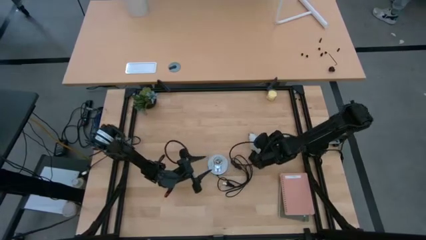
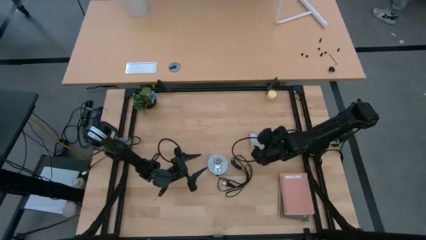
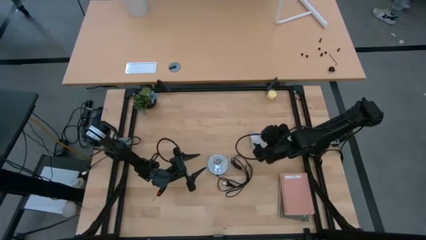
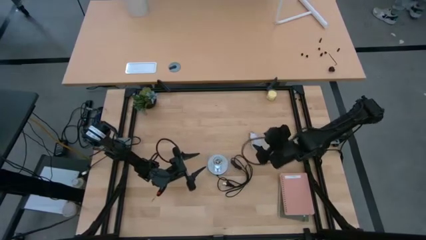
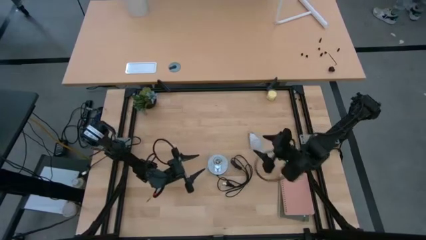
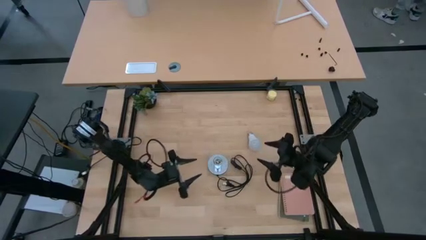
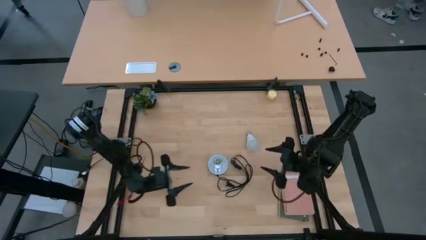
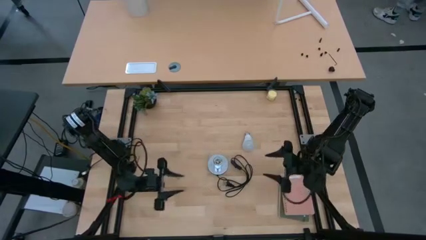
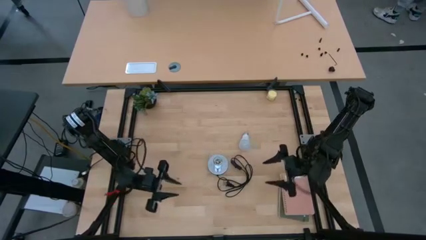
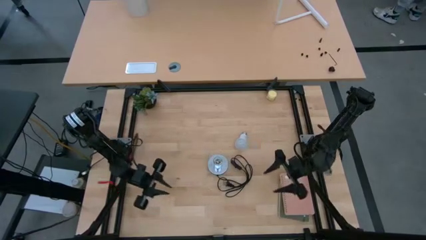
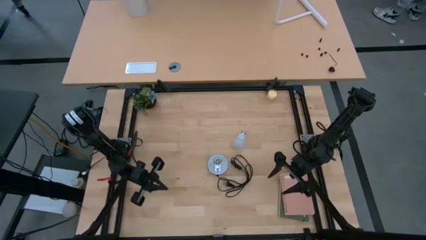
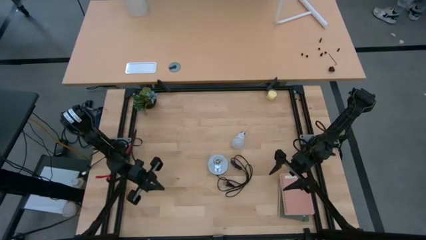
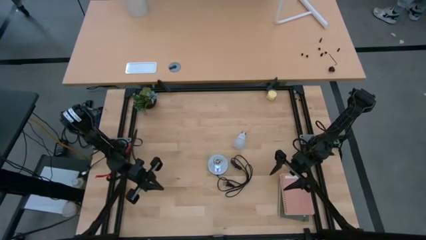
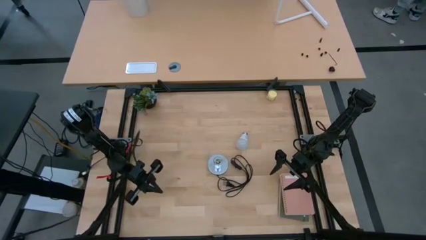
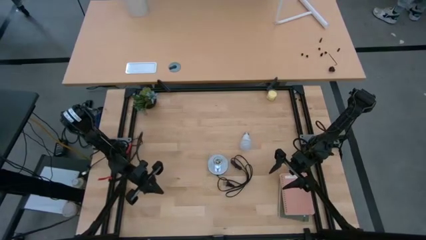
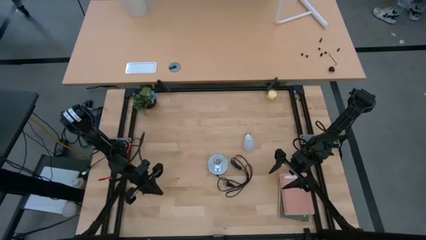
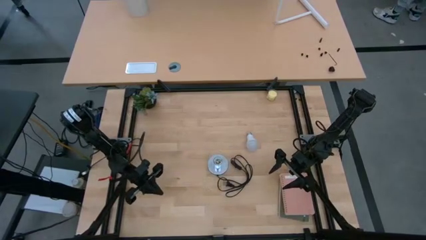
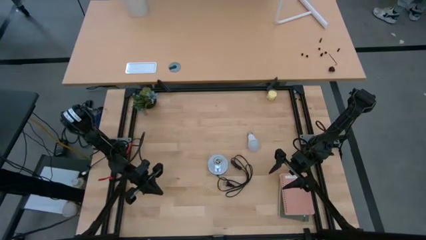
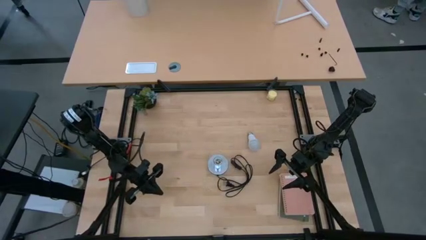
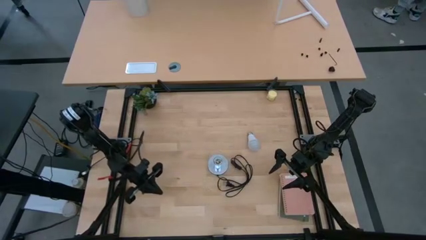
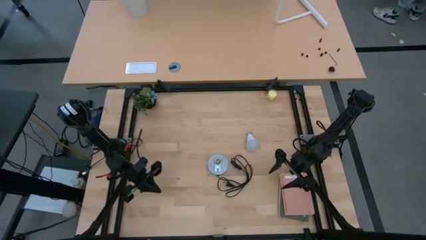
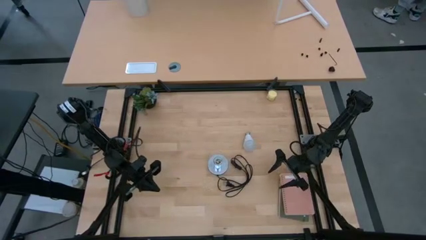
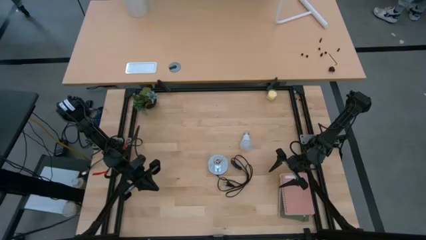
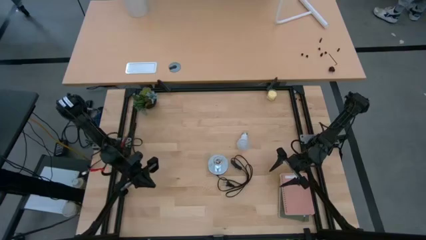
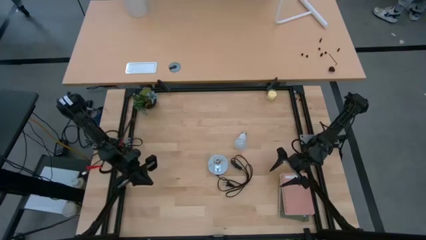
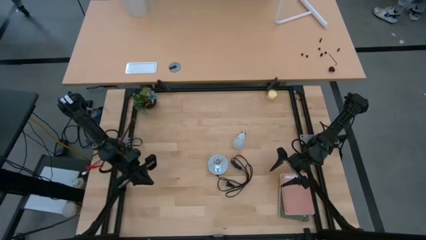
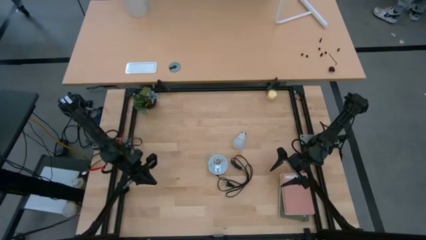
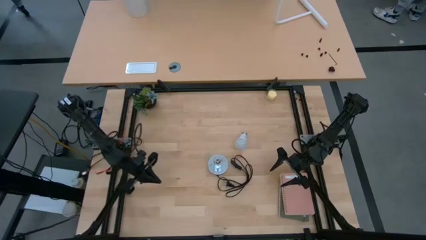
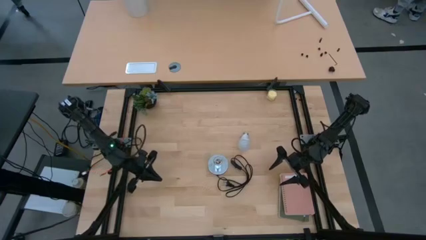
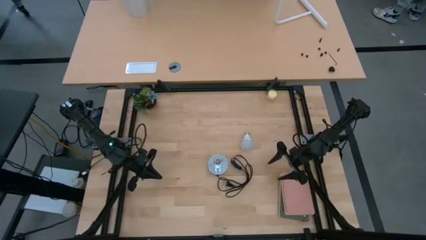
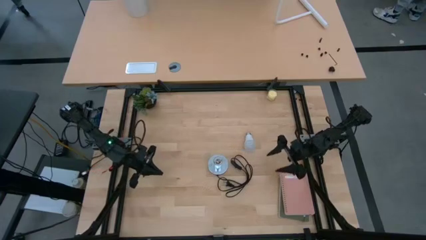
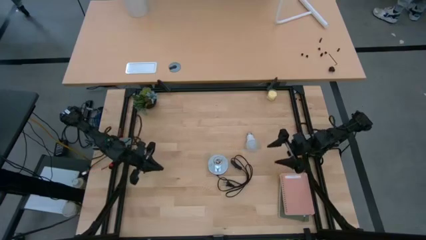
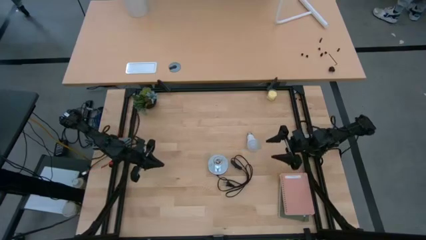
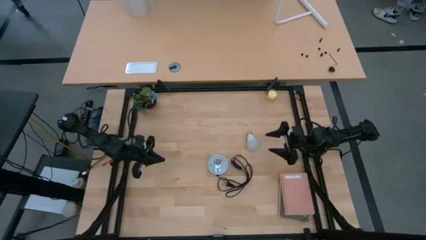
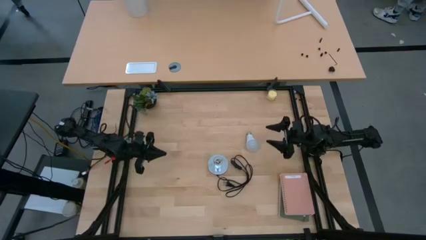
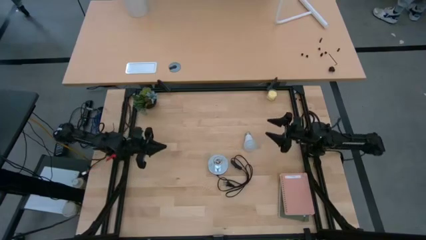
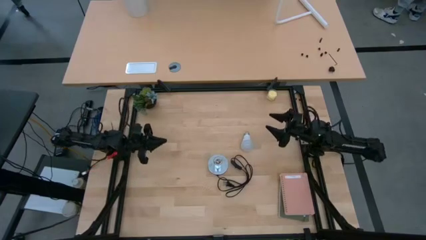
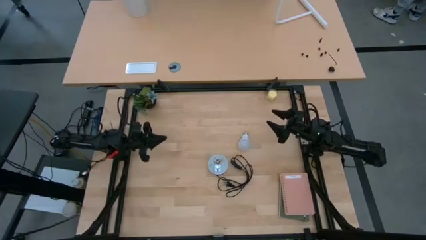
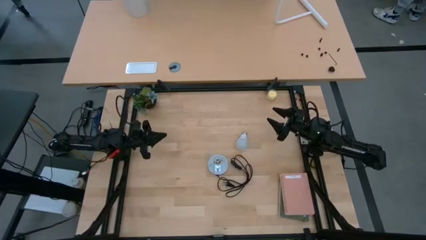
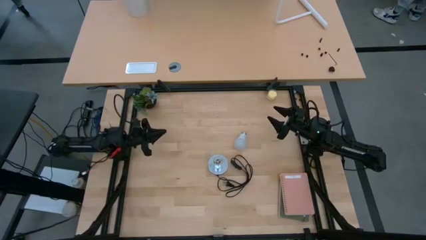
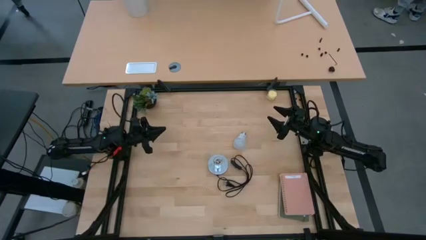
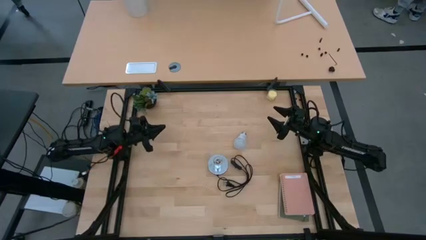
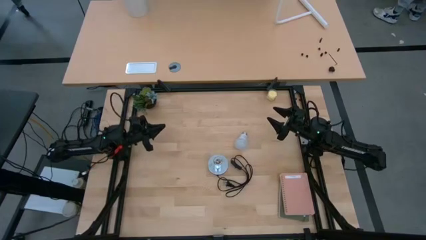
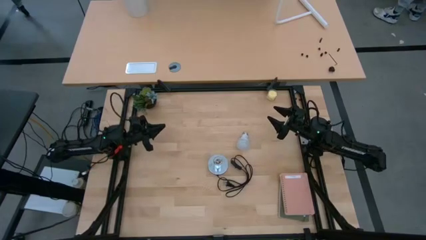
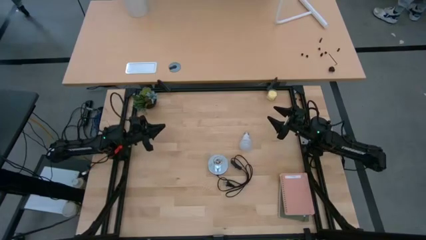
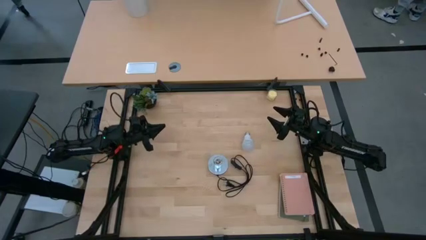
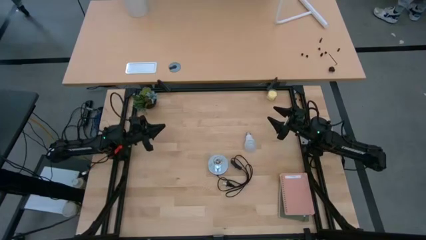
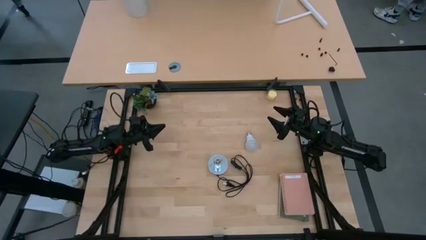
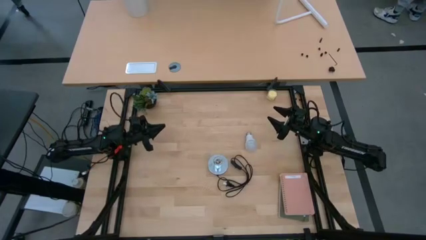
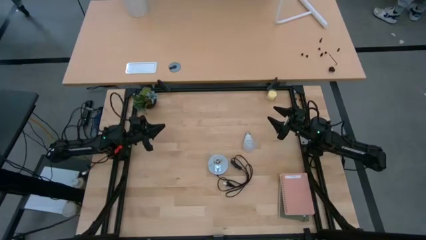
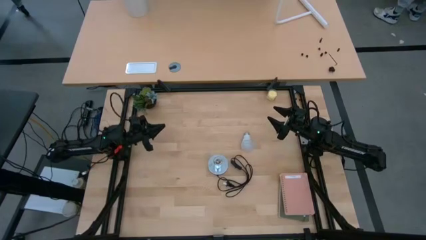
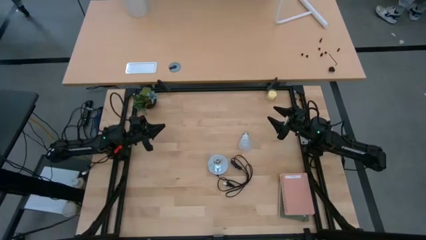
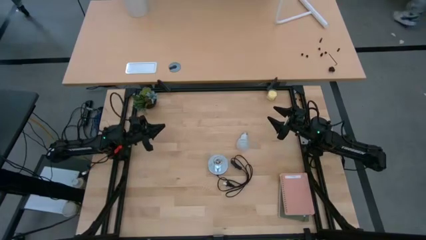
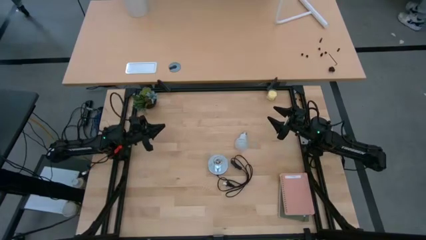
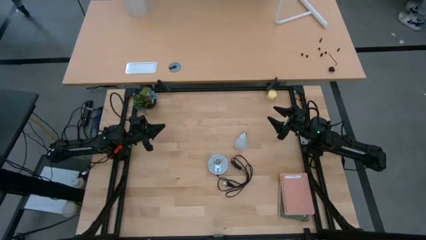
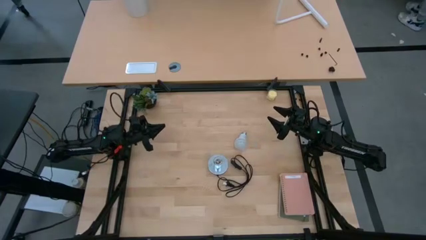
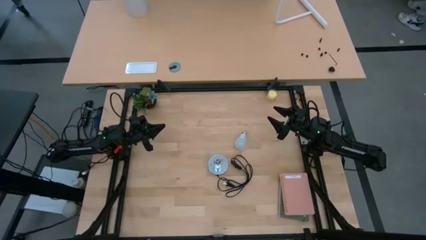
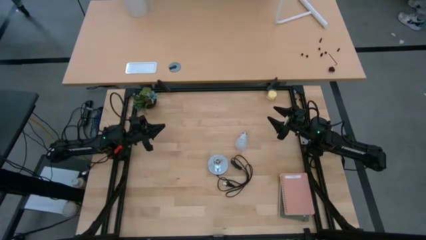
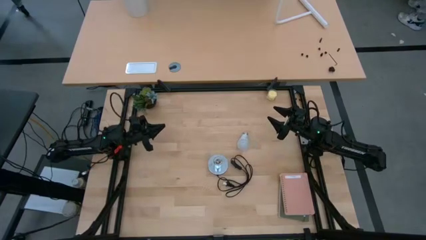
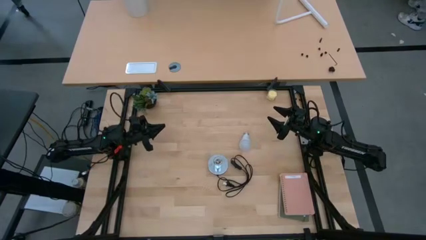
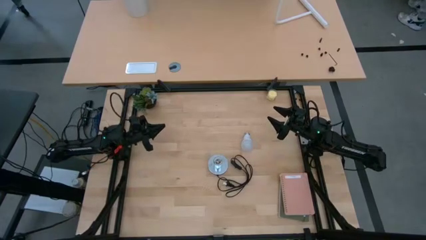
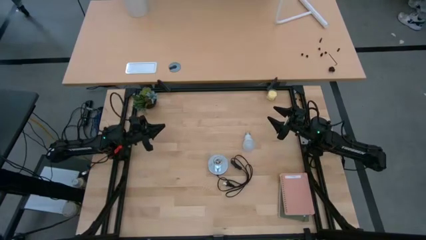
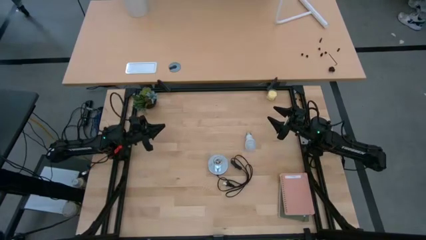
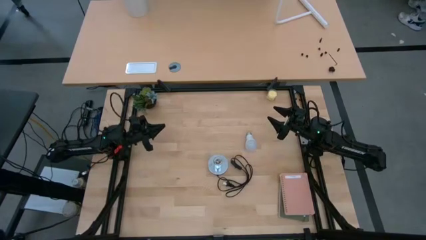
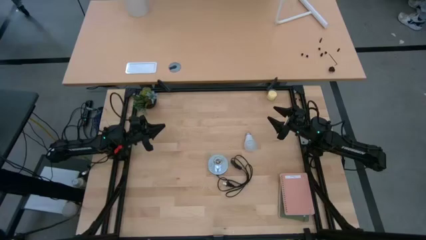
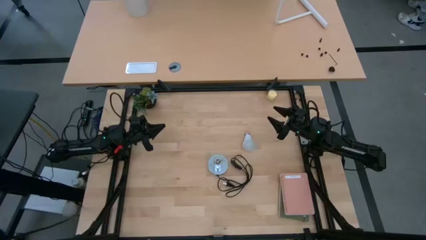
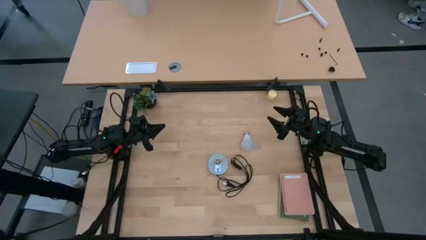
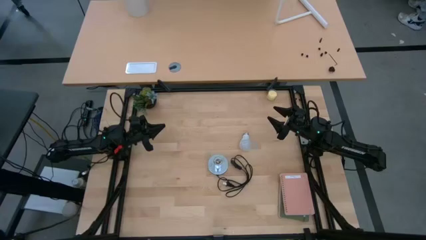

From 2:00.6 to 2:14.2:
Task: Screw lightbulb
Return to Home Position
